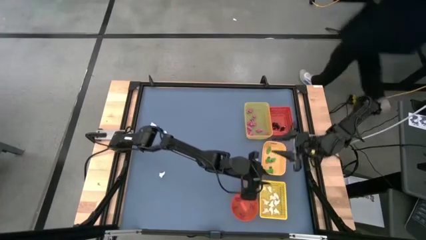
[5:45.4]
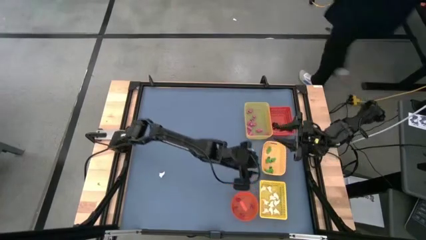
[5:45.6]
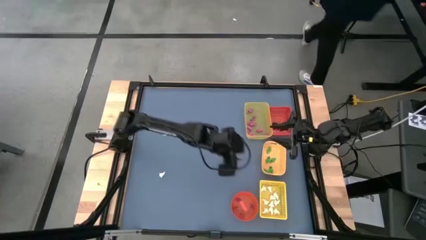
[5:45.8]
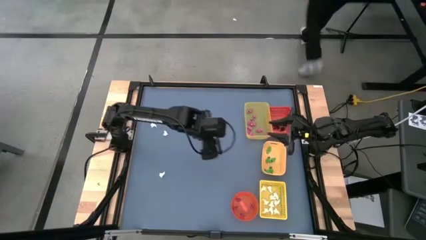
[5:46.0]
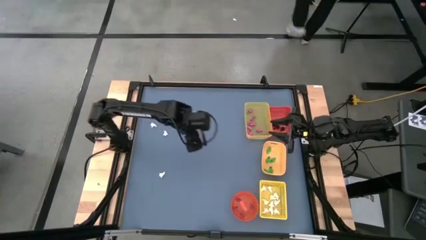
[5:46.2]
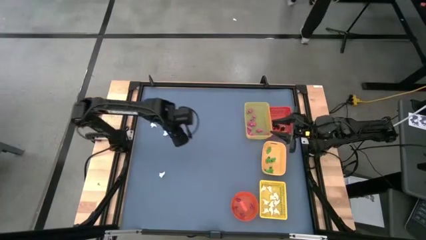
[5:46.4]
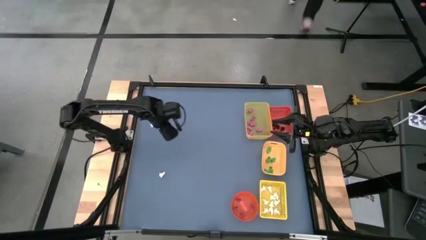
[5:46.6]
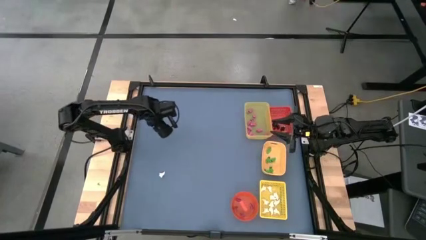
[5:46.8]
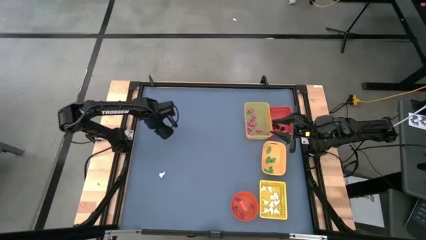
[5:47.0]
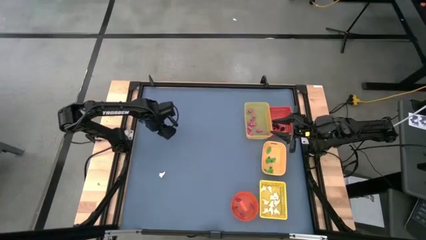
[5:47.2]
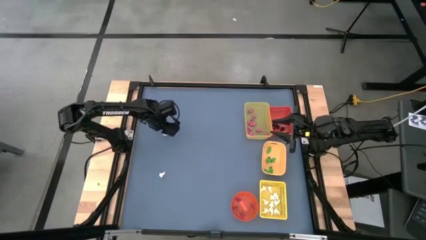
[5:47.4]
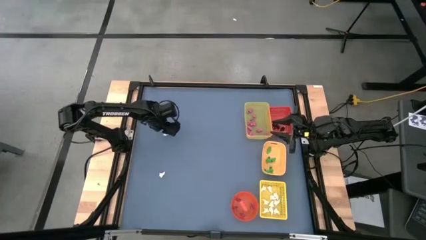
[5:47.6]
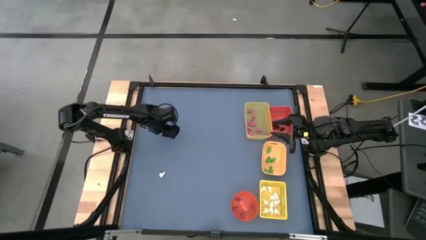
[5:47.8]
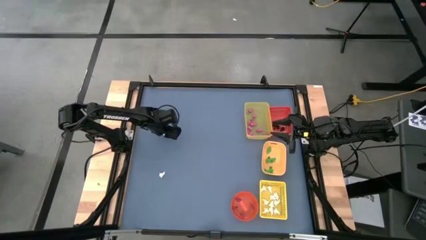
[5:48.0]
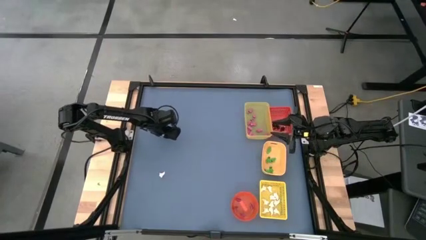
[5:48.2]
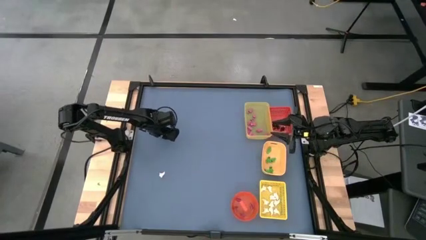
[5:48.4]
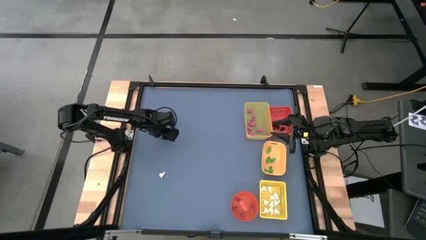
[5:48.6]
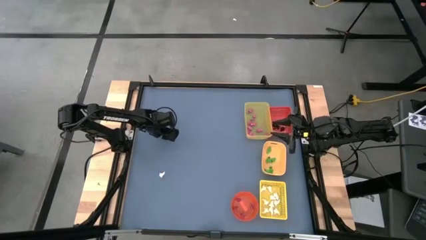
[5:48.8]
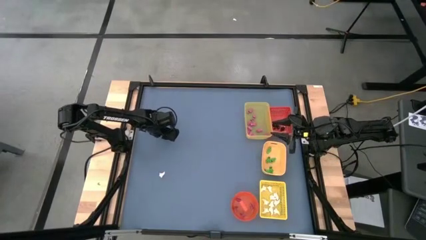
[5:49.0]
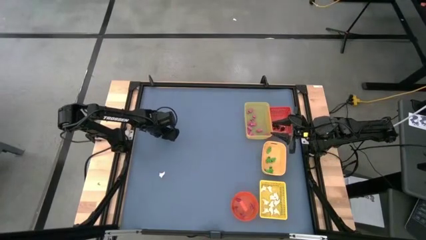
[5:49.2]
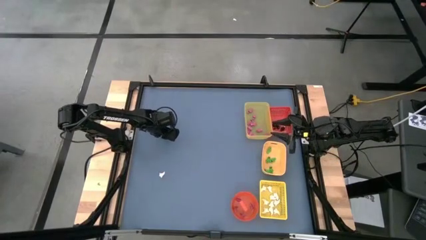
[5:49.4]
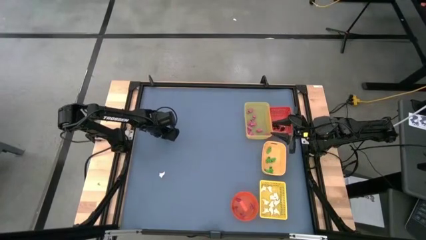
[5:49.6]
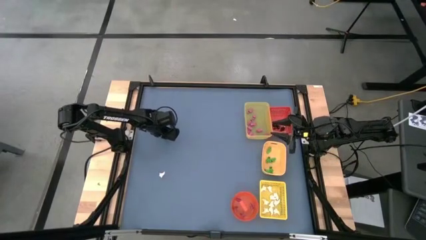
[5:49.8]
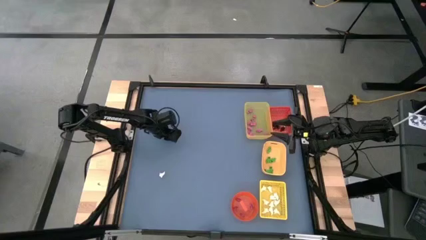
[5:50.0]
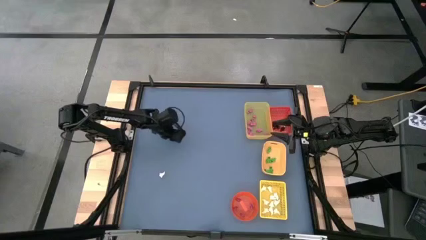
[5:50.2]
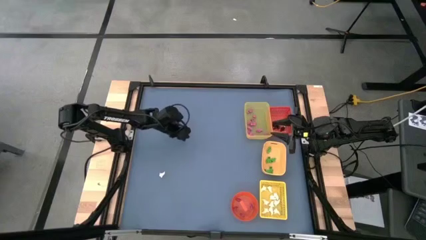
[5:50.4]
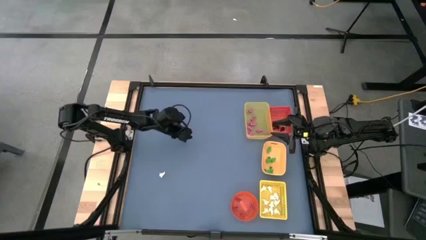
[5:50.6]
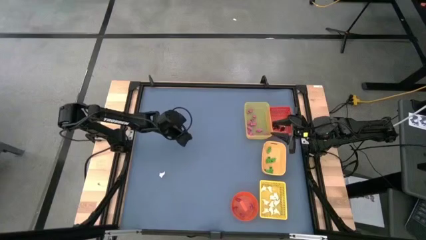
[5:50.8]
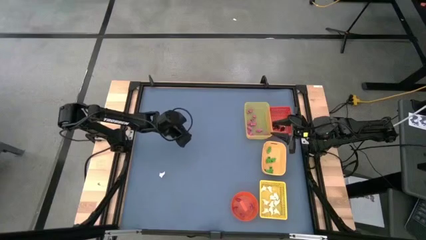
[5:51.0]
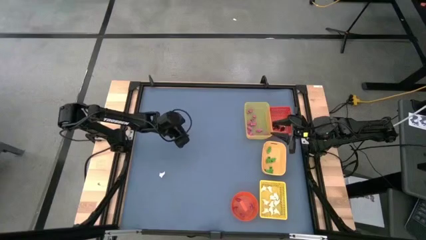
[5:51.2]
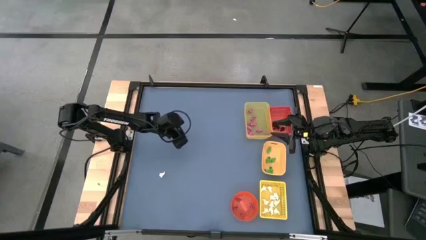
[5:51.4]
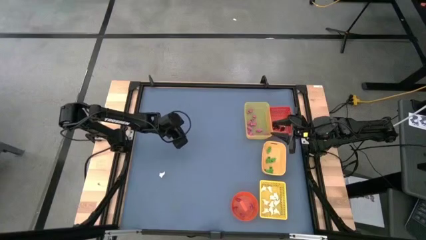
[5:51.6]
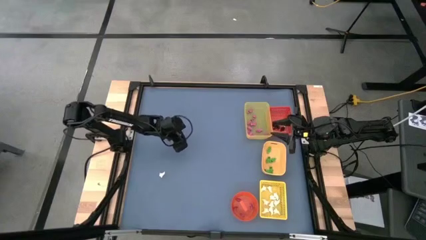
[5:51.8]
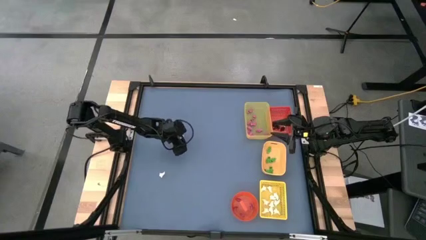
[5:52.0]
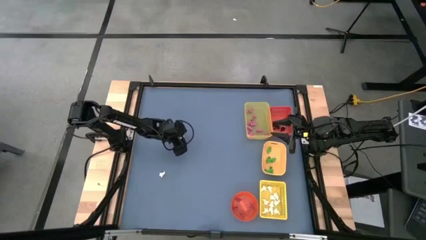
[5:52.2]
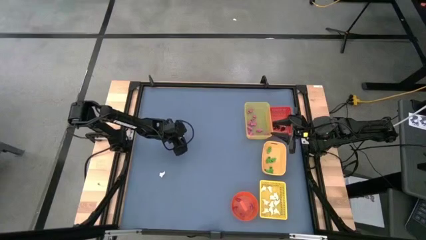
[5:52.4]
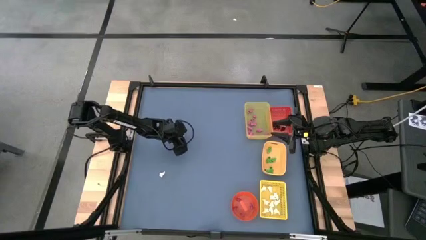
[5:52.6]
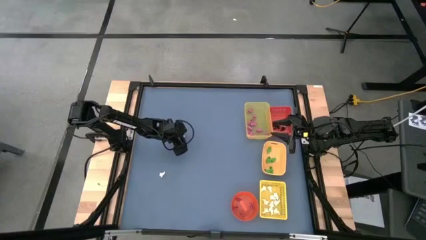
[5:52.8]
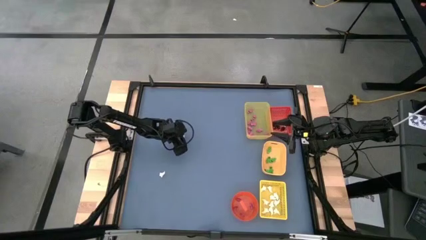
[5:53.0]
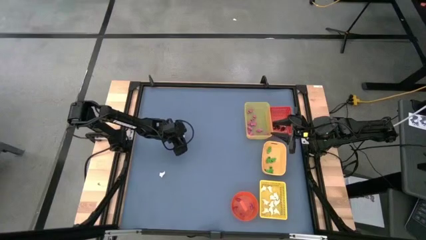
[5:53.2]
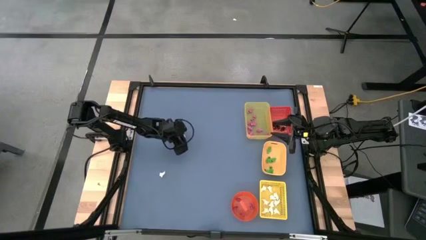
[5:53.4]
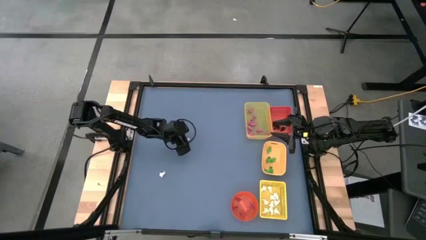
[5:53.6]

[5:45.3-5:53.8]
Task: Sort Halloween decoration
Put the white ghost toy into the yellow box

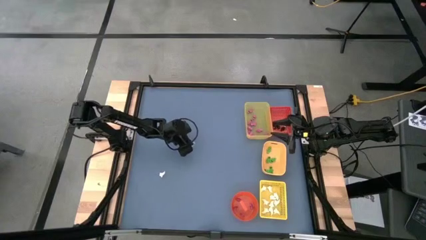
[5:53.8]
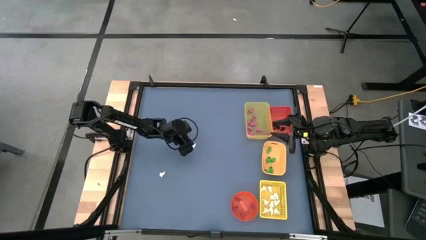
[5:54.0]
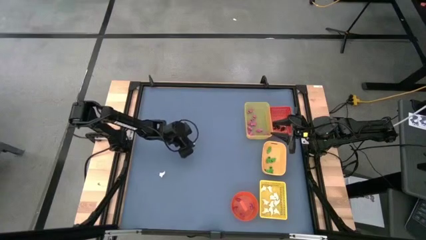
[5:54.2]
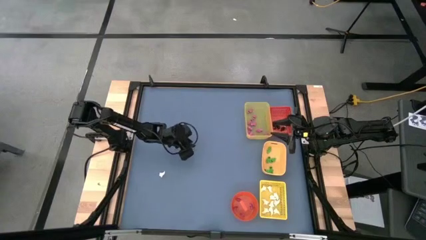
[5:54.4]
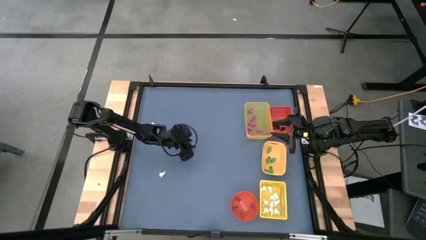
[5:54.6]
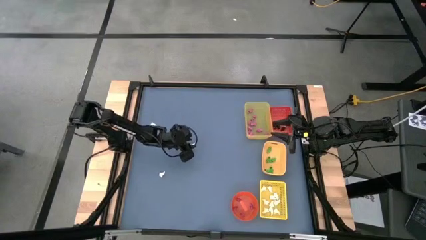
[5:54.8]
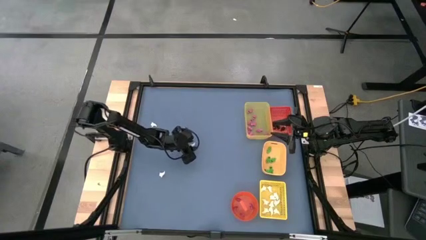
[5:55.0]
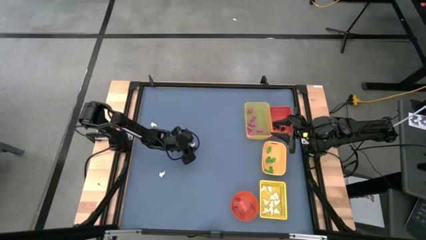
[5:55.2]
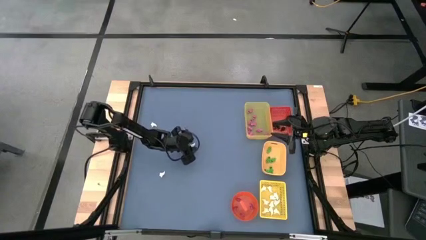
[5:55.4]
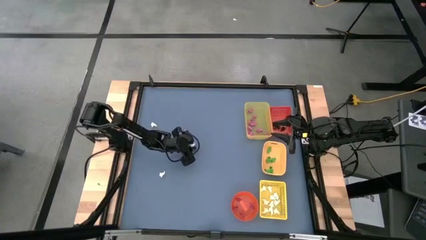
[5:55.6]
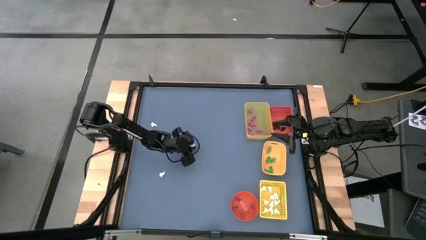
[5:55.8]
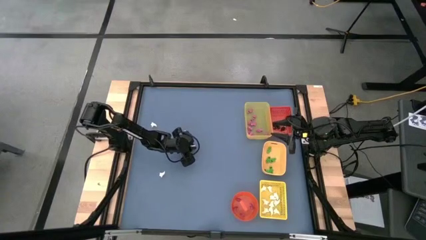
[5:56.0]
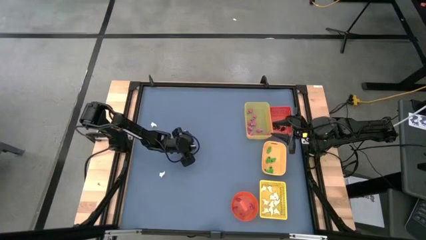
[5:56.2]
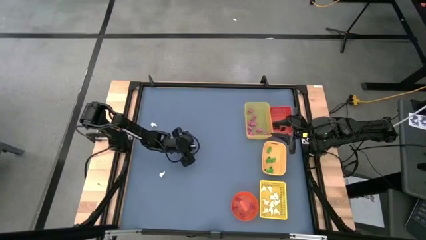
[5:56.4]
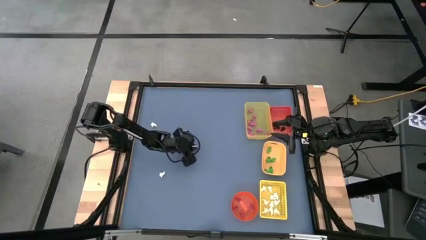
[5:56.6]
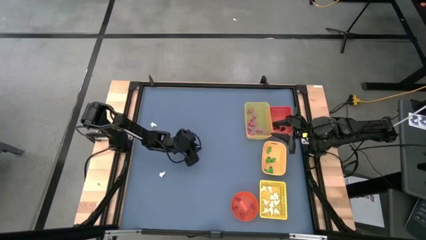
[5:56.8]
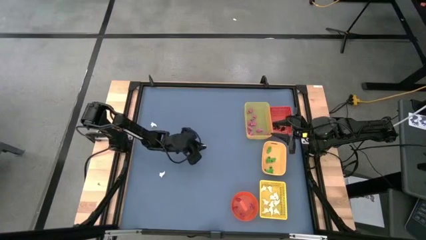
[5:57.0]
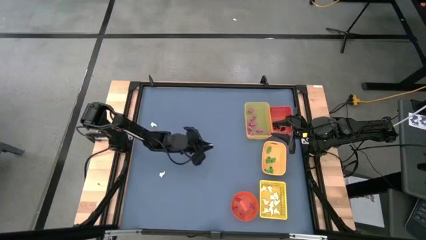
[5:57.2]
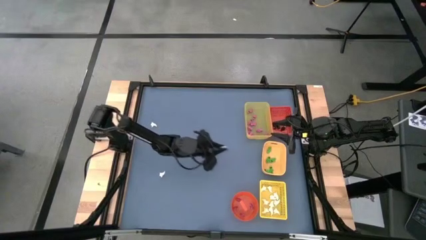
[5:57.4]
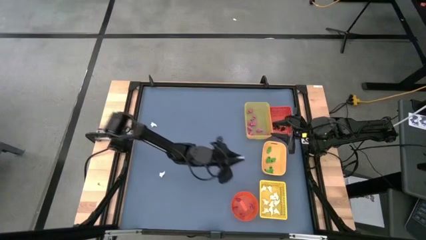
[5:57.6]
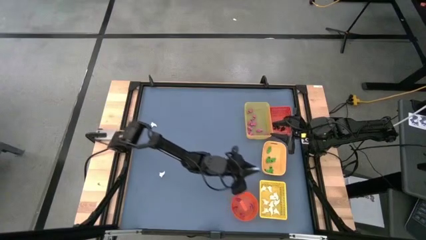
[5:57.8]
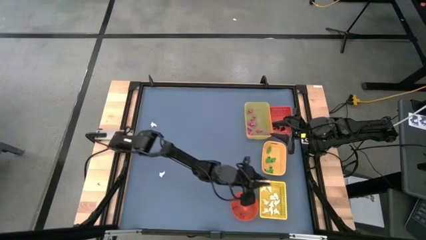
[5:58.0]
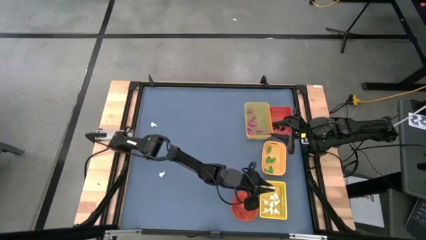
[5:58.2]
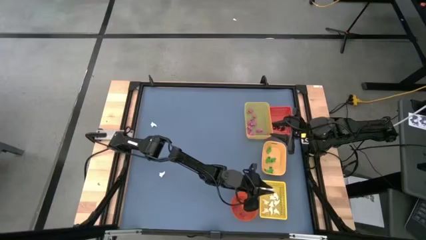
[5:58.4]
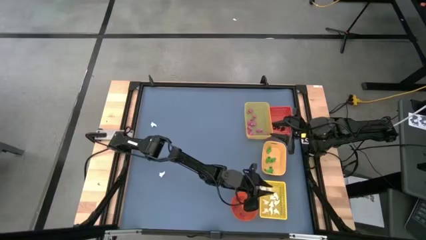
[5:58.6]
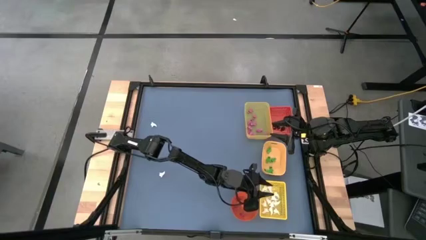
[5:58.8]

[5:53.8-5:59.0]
Put the white ghost toy into the yellow box
